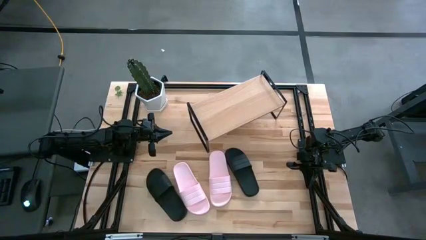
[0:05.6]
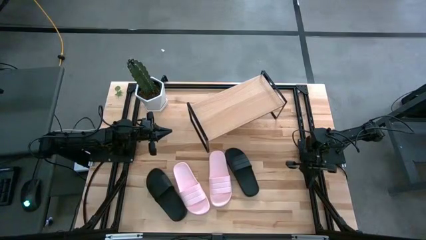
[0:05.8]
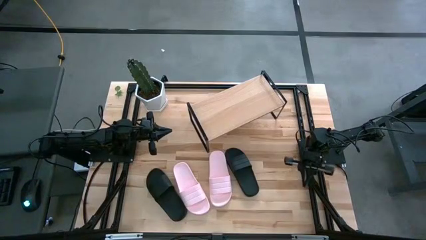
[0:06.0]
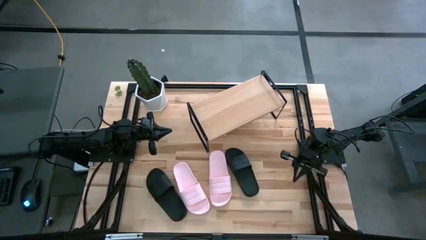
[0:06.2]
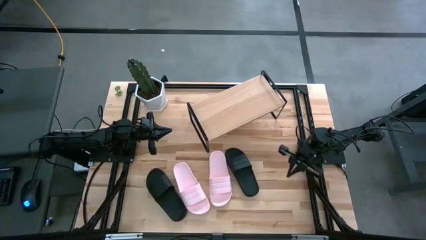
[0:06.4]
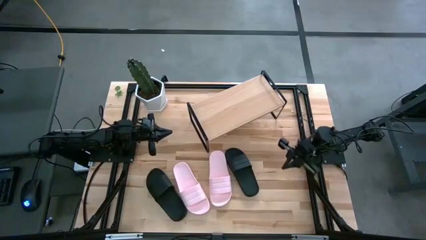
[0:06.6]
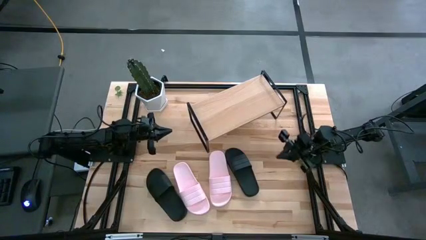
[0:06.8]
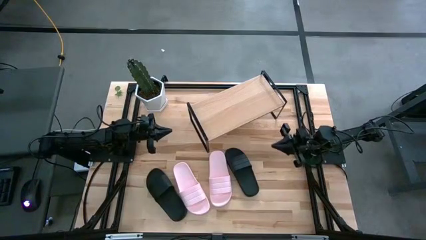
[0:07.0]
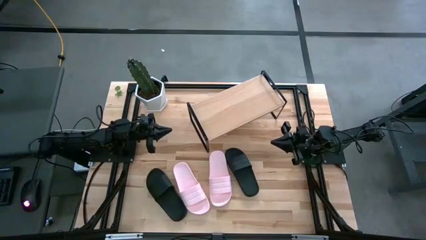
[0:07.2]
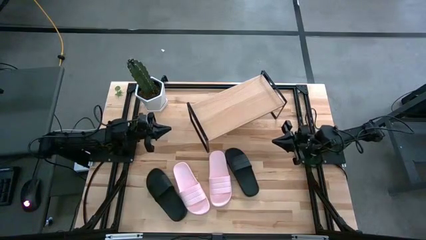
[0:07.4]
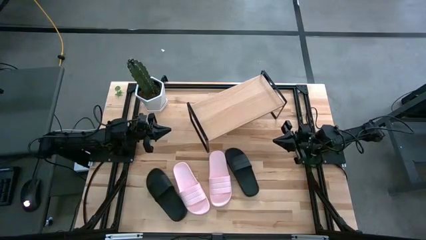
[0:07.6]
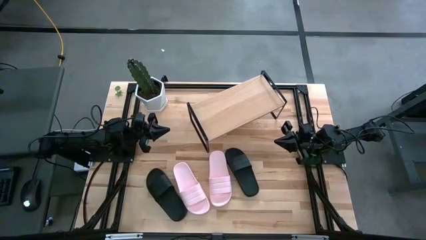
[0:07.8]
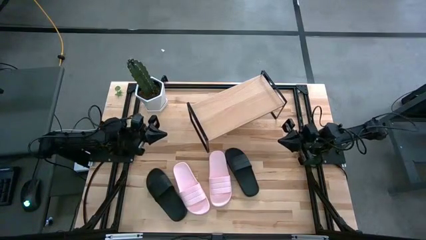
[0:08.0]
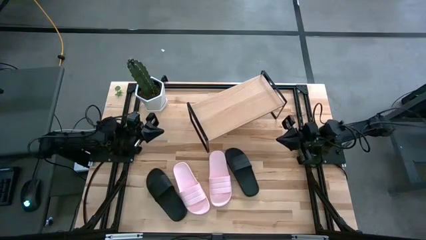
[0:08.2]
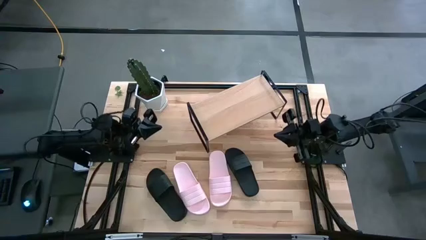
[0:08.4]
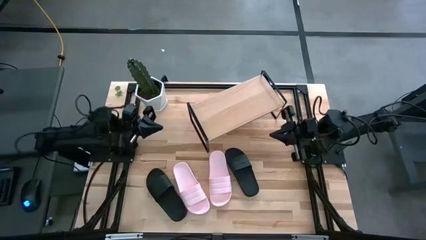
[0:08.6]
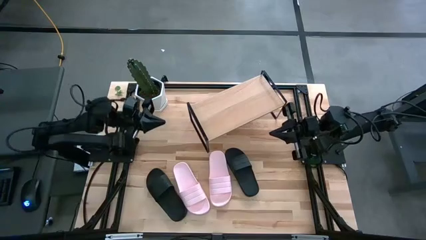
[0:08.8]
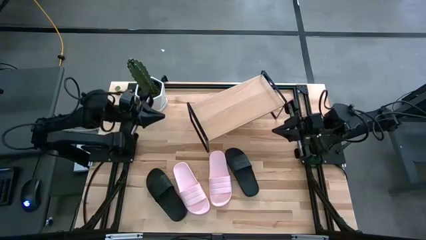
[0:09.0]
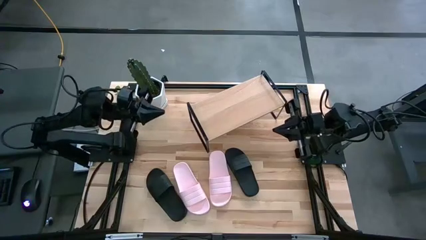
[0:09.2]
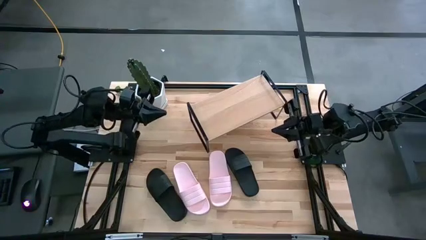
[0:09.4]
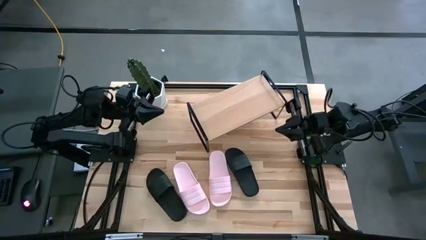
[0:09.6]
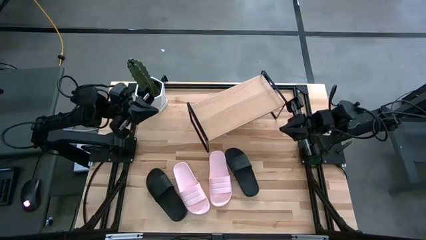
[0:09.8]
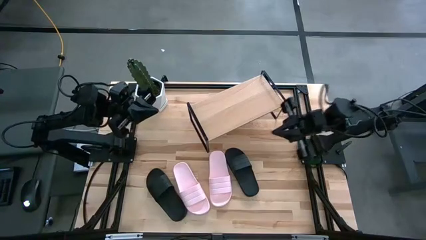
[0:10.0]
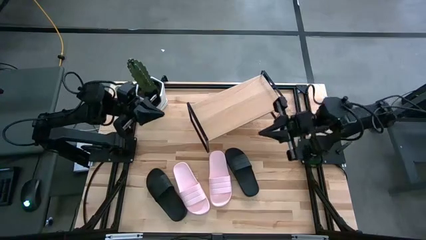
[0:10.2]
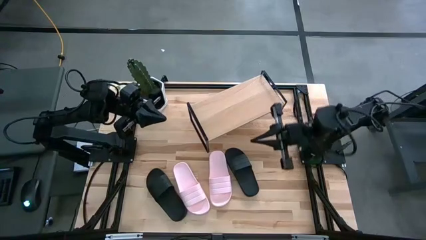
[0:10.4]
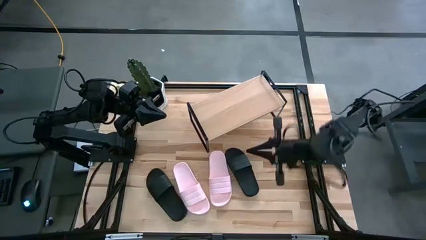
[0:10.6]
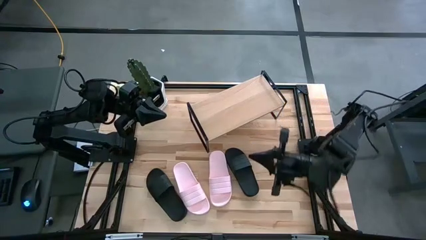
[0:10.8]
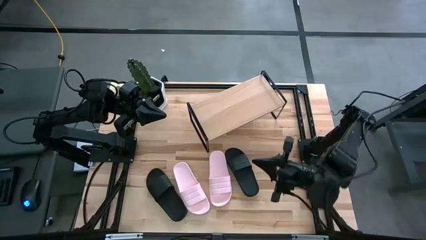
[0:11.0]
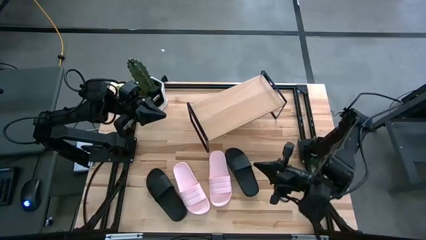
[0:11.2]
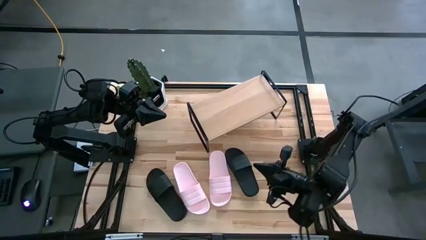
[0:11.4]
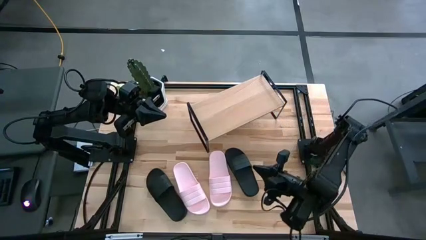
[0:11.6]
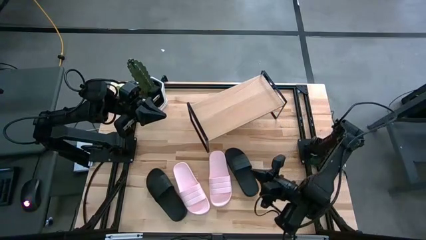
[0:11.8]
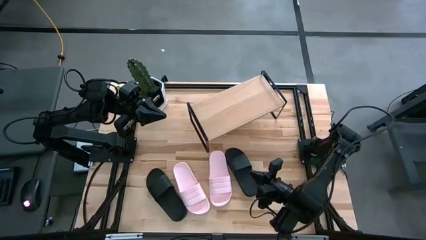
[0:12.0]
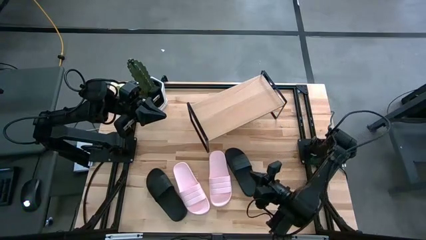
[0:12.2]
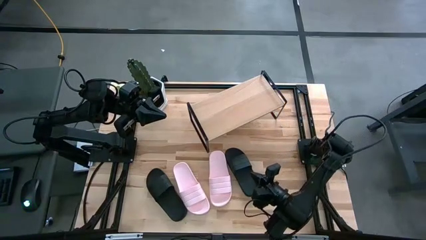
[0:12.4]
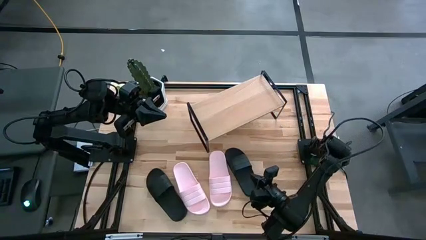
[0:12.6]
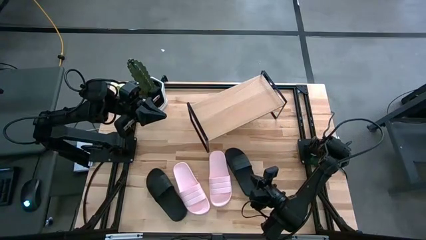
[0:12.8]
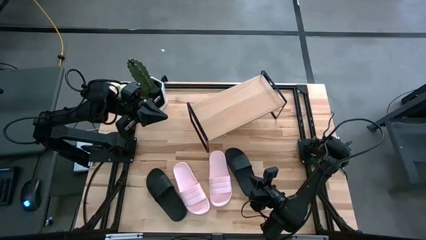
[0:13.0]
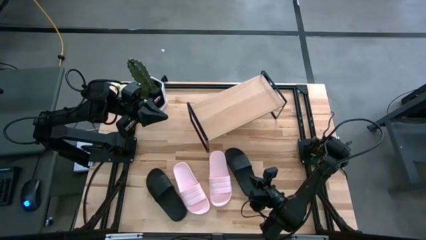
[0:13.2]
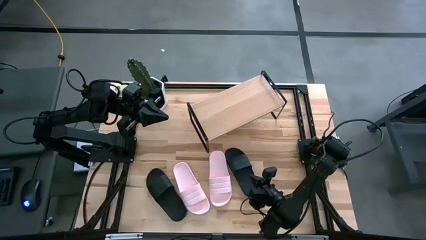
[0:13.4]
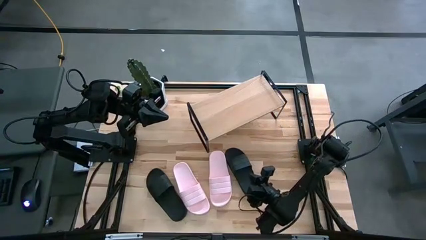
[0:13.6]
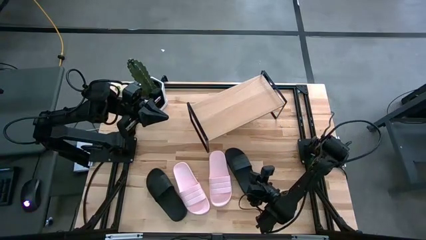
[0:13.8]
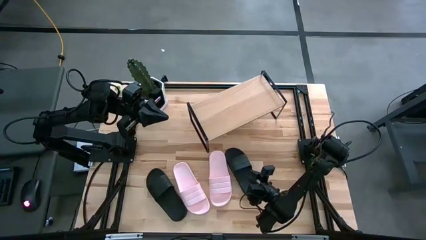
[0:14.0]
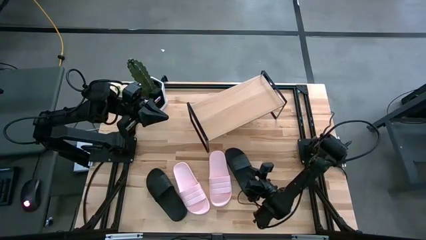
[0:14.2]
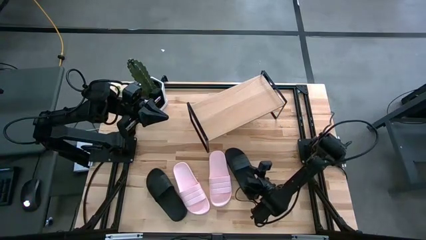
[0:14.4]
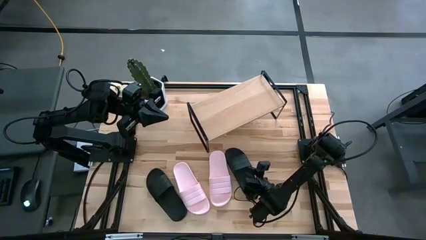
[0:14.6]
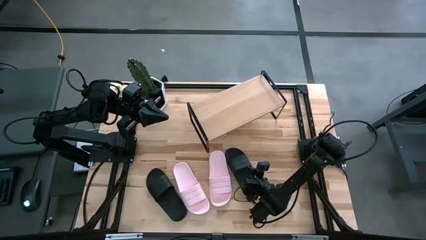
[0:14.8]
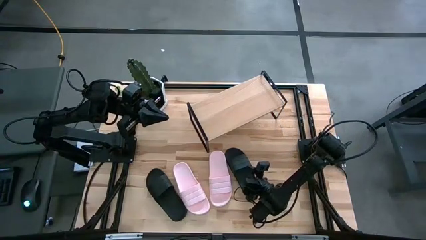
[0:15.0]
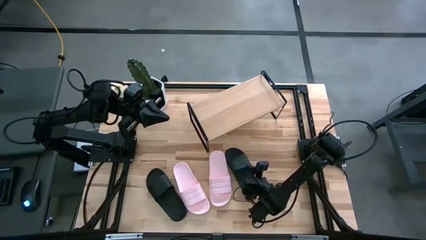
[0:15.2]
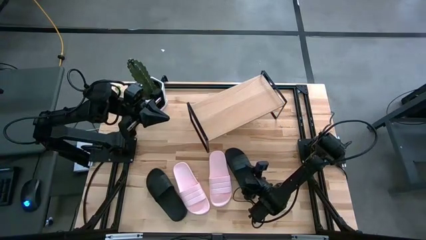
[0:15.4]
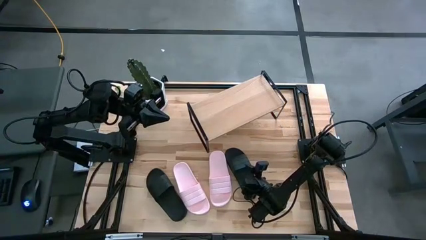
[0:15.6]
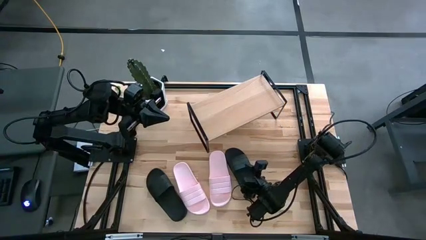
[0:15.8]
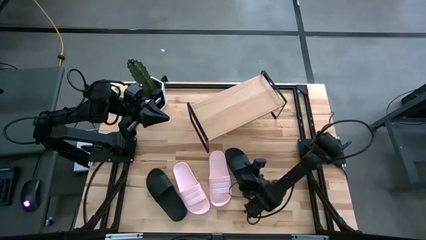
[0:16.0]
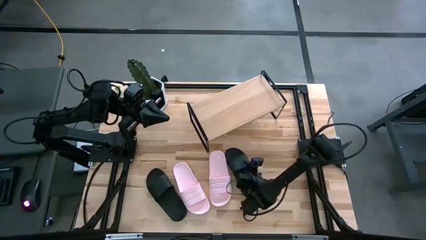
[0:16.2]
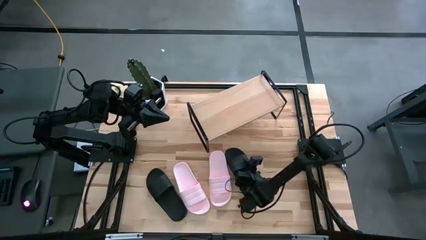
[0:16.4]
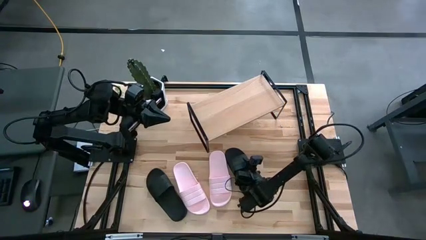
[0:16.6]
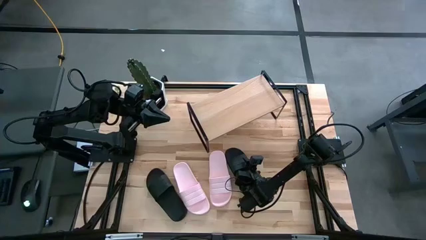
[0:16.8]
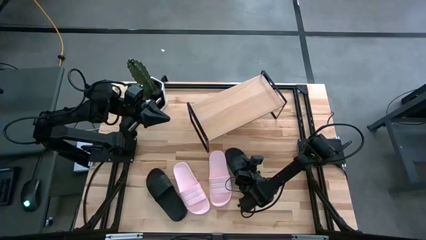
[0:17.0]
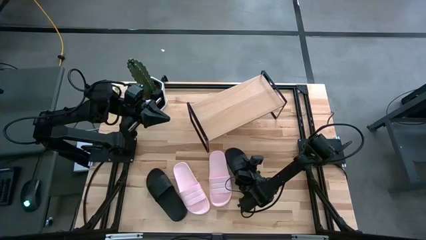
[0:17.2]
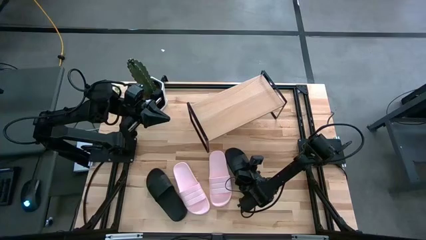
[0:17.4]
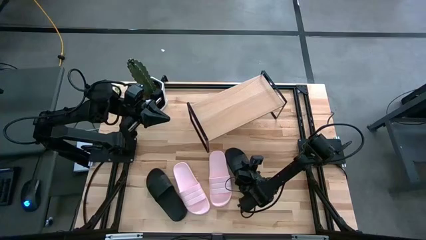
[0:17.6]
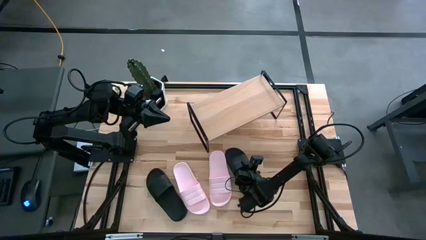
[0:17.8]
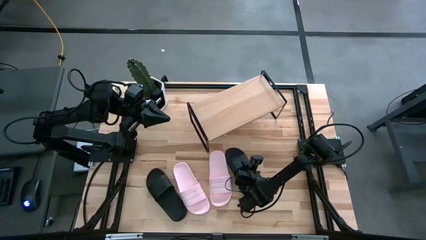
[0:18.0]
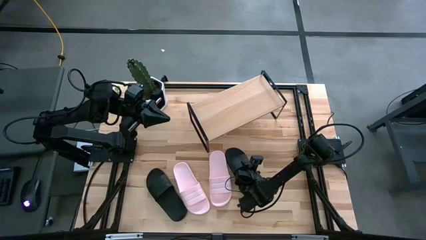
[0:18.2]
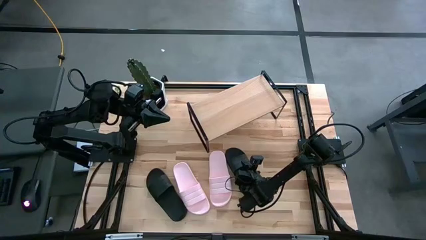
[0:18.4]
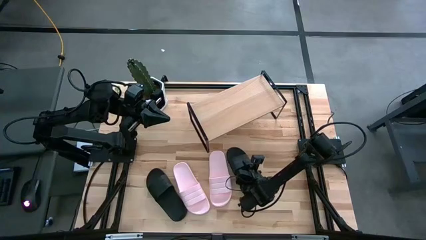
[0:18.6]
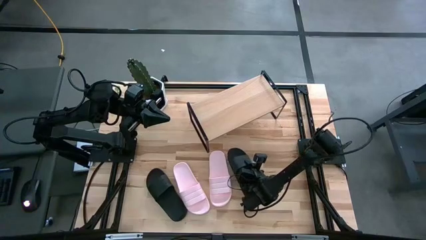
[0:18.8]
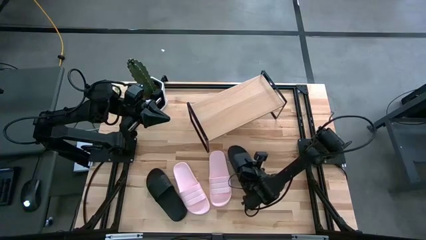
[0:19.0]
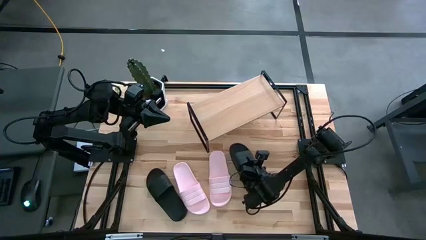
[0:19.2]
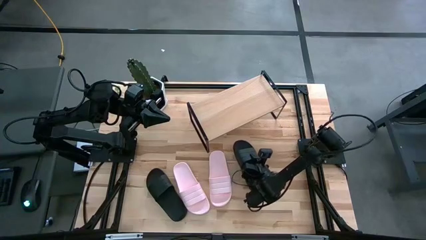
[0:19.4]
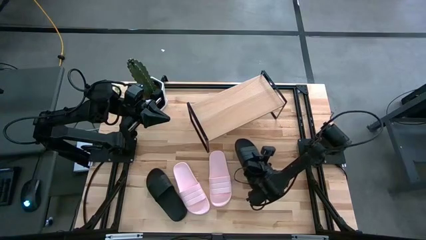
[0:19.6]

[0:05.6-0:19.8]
Task: Pick and place slides into the shelf
Put the right black slide on the shelf
